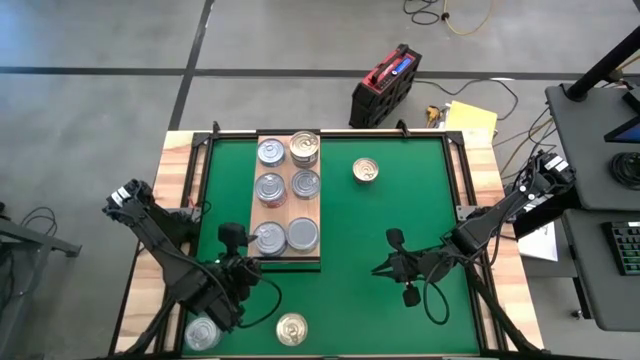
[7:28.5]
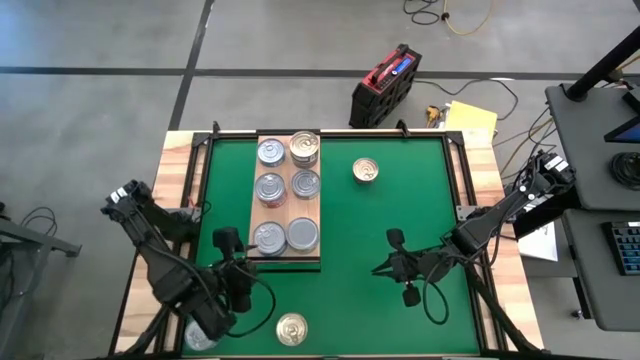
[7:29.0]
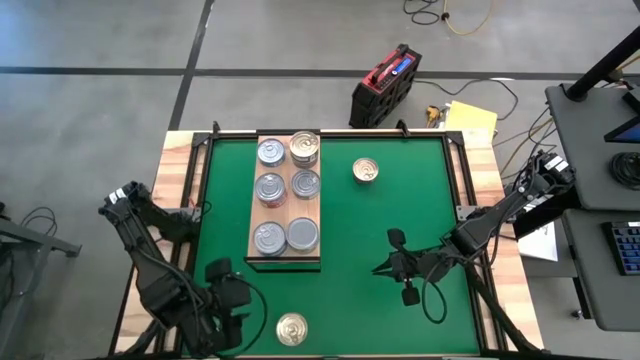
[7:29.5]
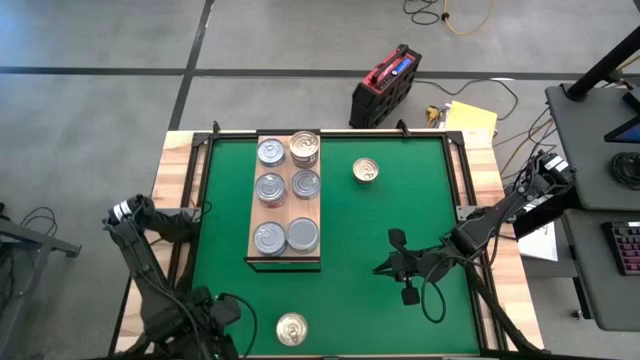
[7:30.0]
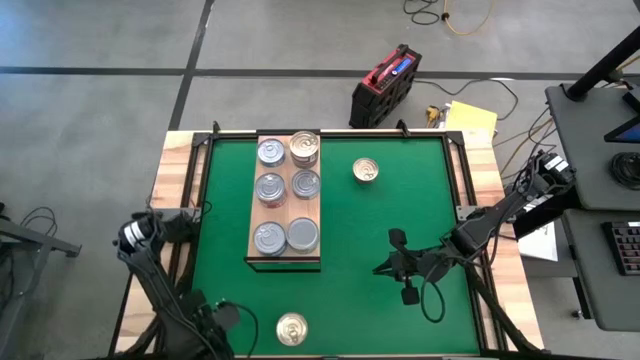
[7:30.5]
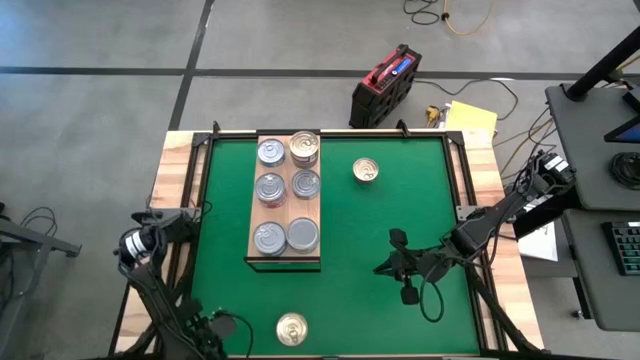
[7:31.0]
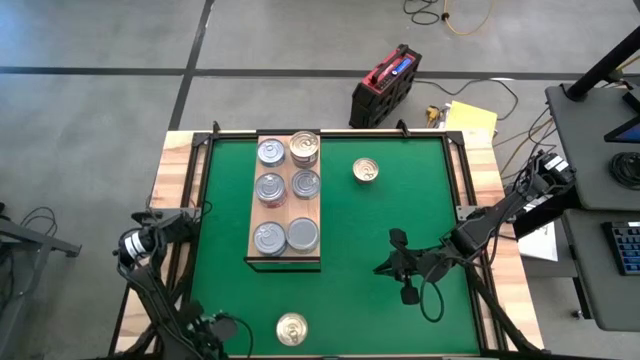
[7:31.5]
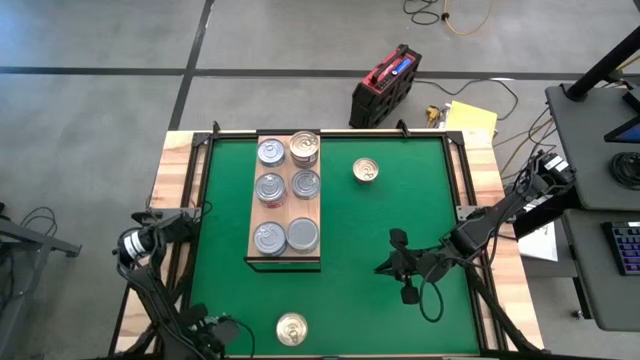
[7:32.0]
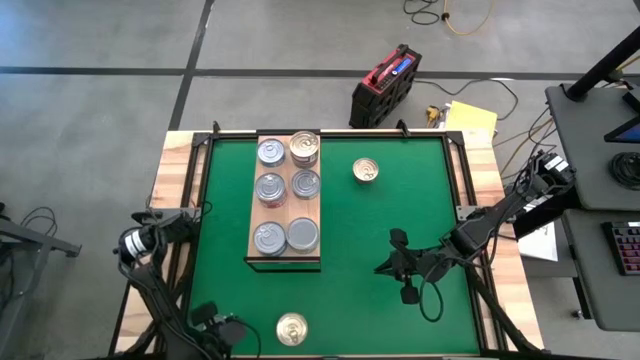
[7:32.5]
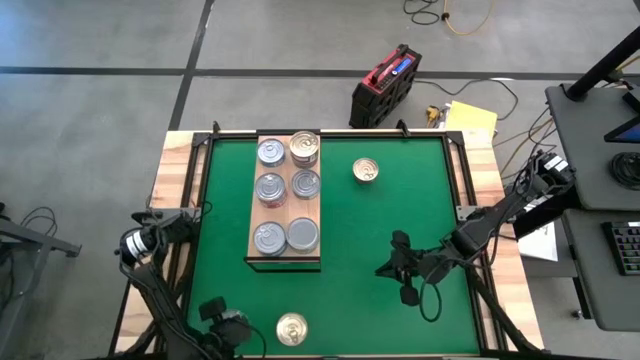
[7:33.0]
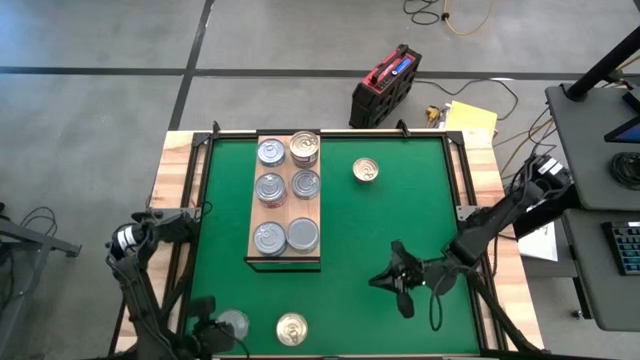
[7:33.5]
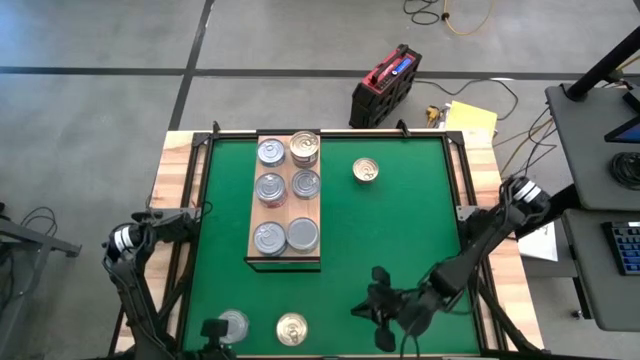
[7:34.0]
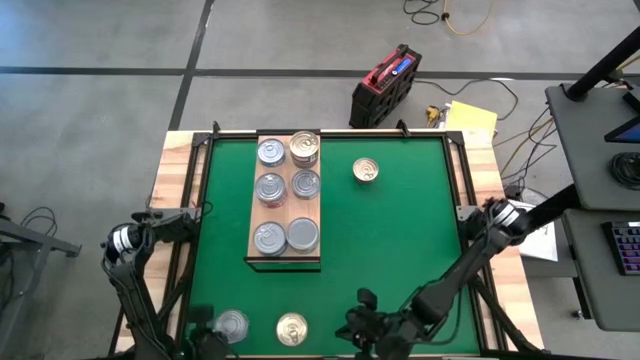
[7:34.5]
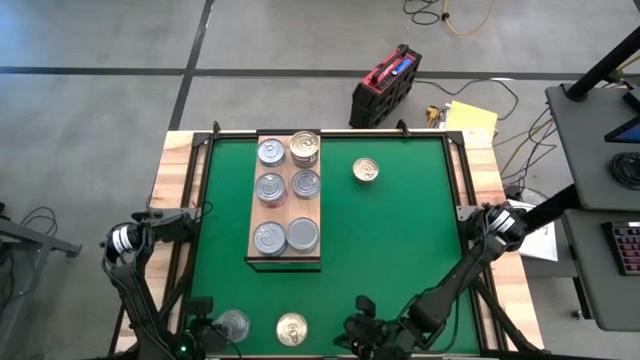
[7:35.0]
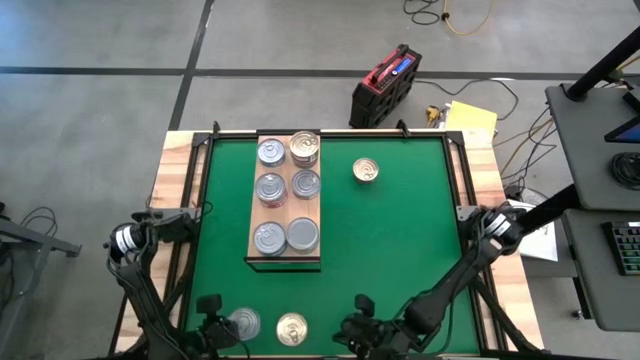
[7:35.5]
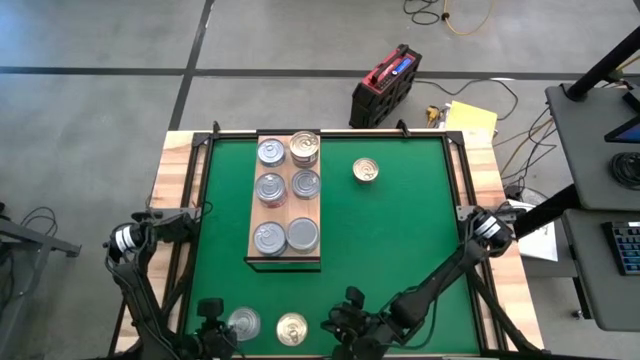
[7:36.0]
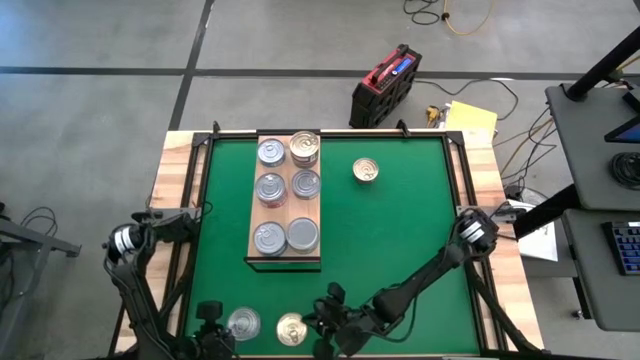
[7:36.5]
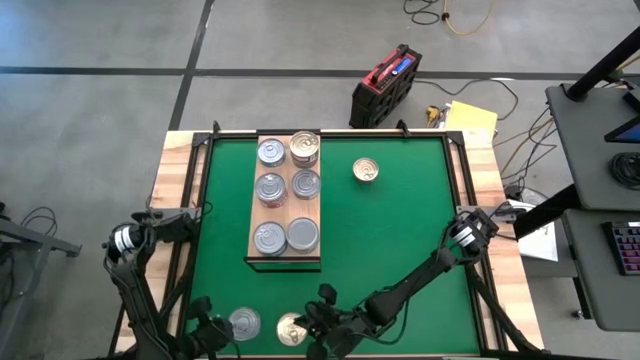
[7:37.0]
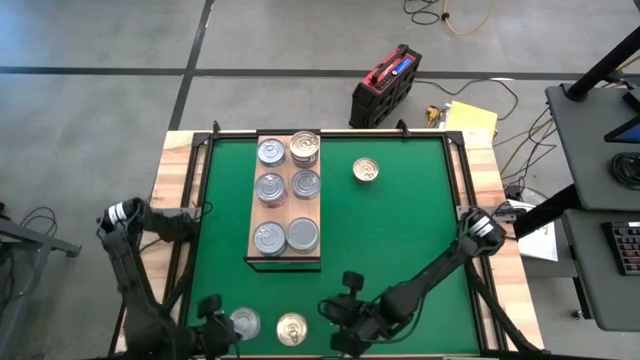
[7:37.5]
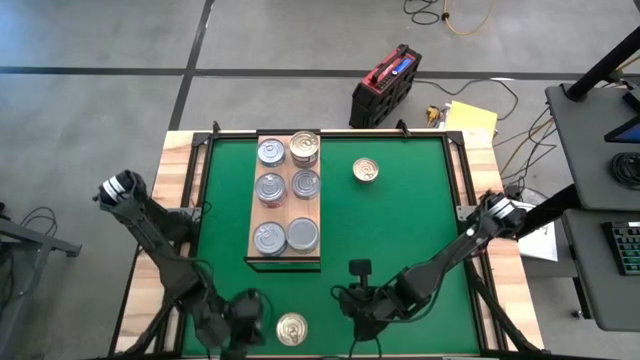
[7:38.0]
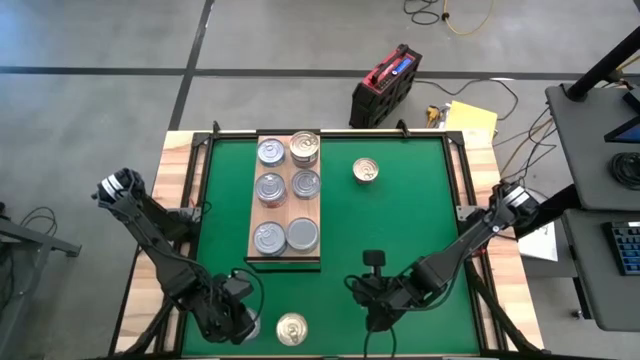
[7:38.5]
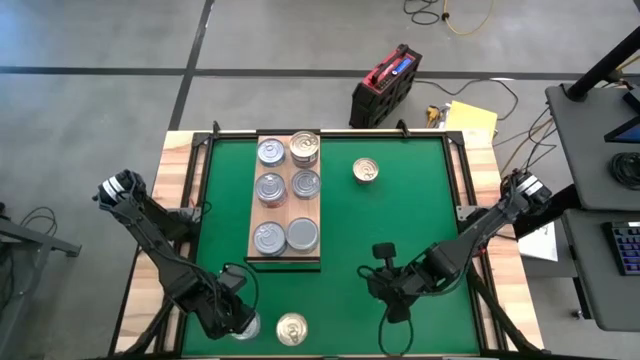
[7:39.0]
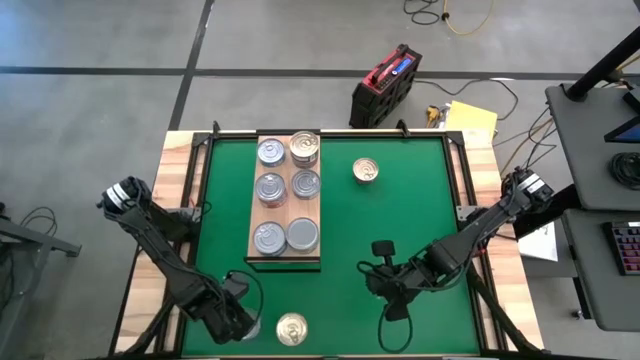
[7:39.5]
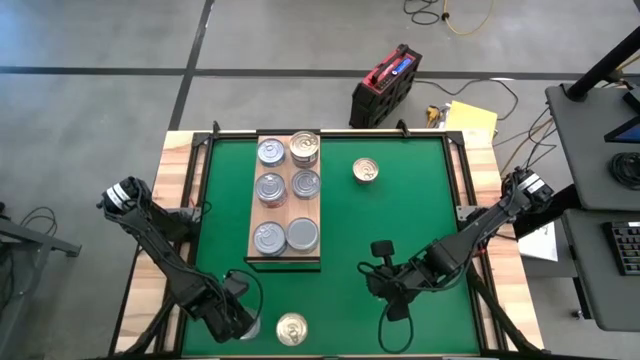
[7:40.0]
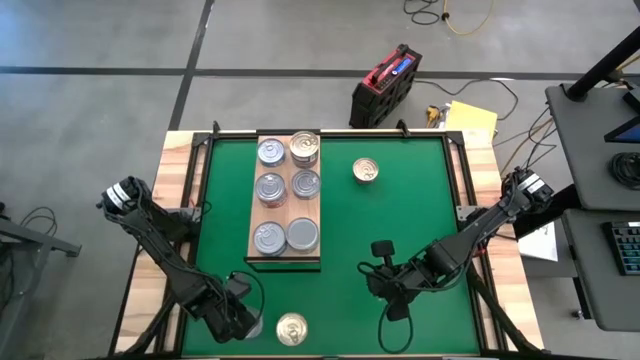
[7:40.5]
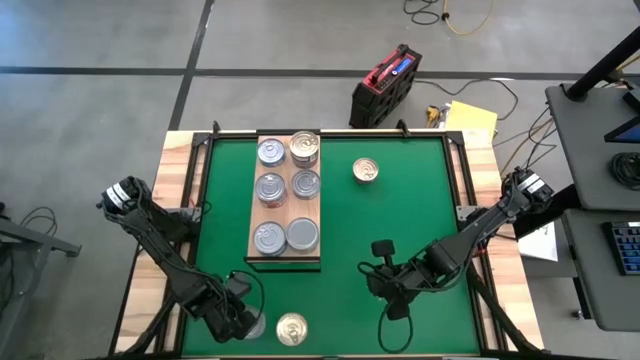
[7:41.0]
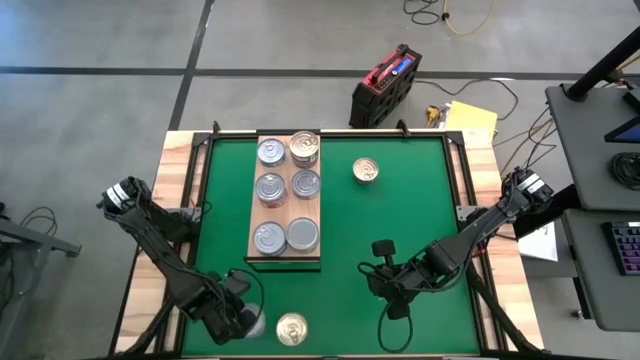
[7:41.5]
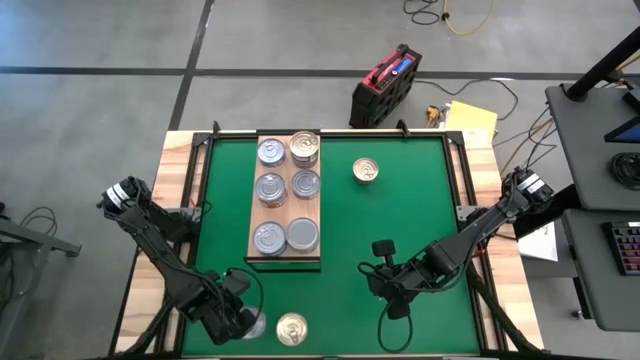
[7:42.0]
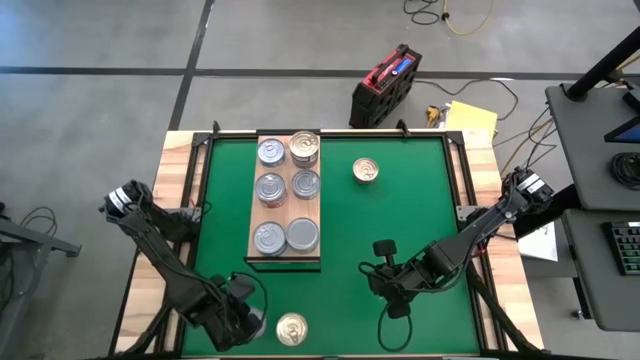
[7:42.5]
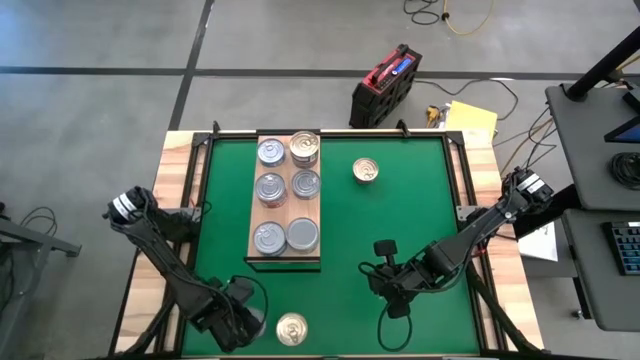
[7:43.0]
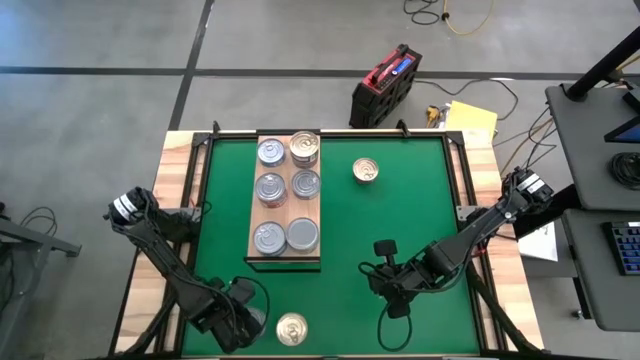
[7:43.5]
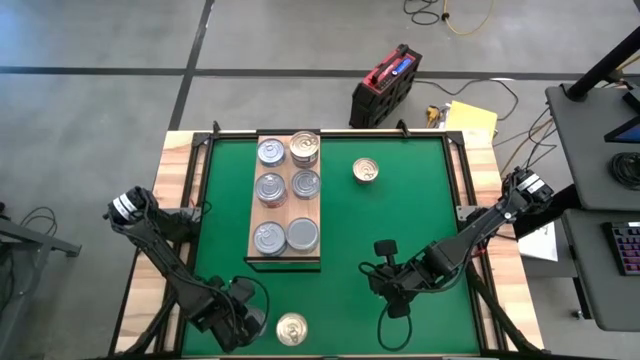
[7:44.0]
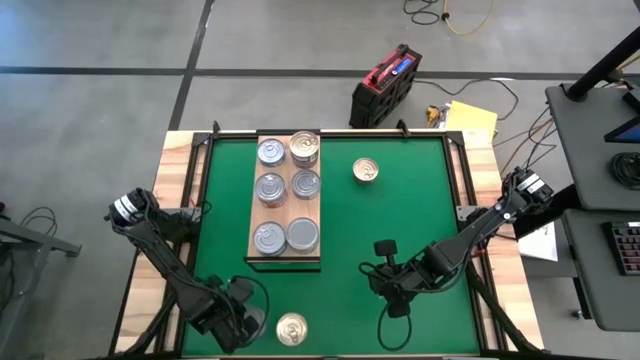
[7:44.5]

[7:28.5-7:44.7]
Task: Stack canned seafood by type on shelf
Put the blue tuna can on the shelf

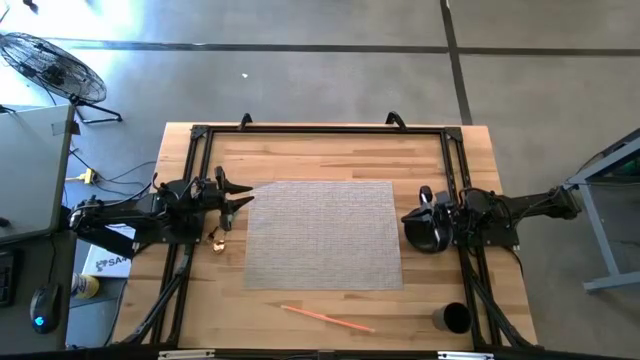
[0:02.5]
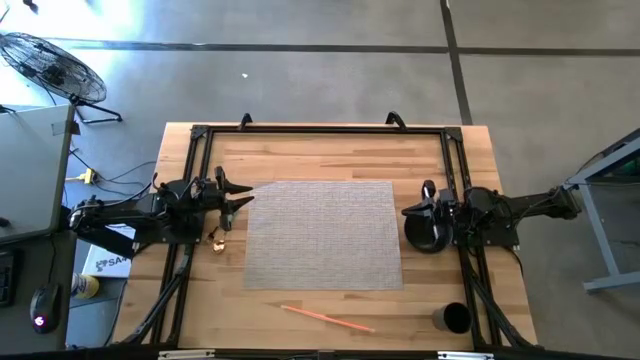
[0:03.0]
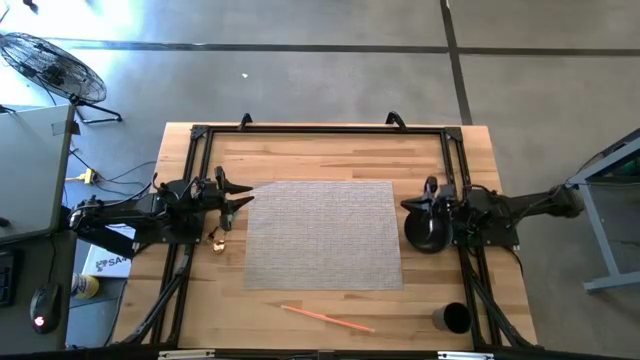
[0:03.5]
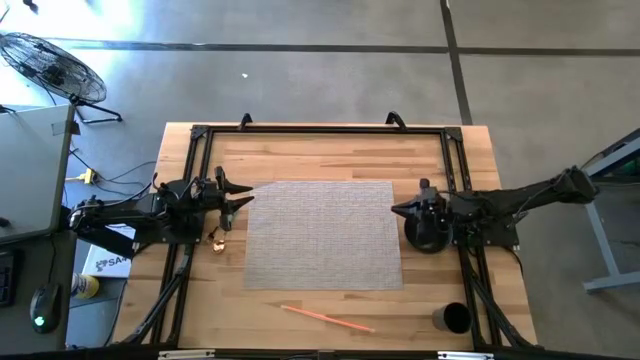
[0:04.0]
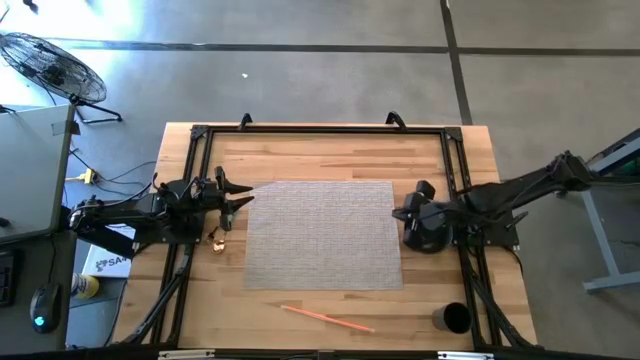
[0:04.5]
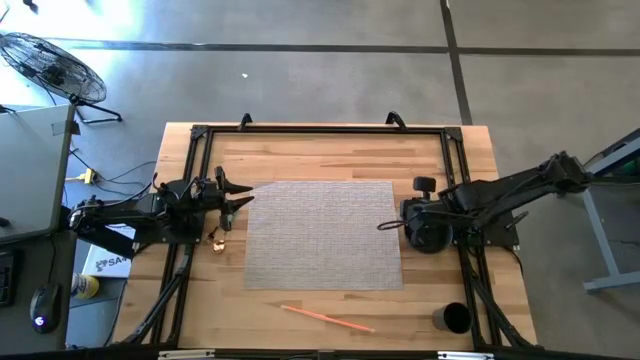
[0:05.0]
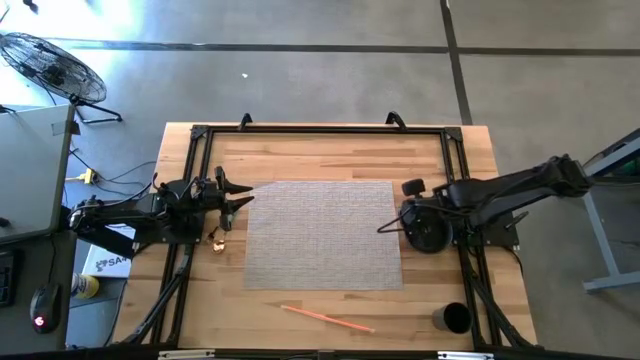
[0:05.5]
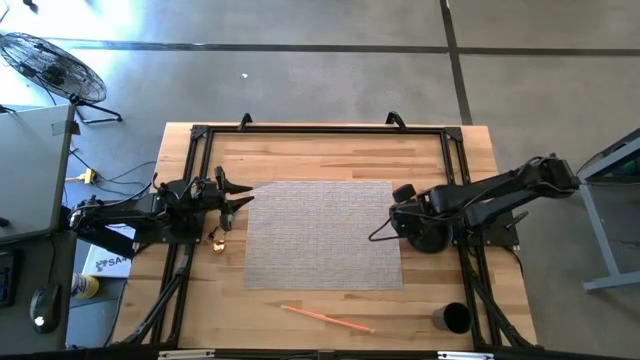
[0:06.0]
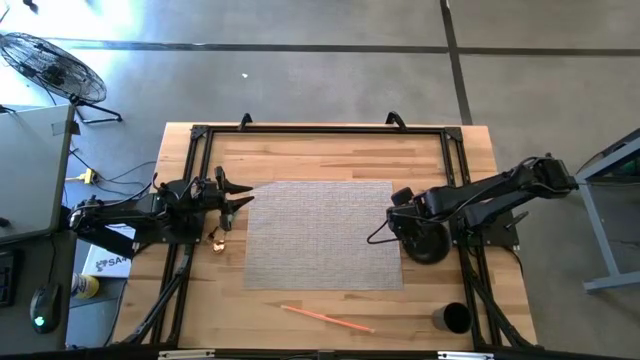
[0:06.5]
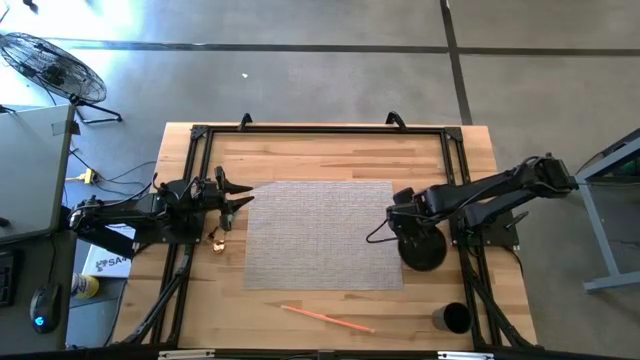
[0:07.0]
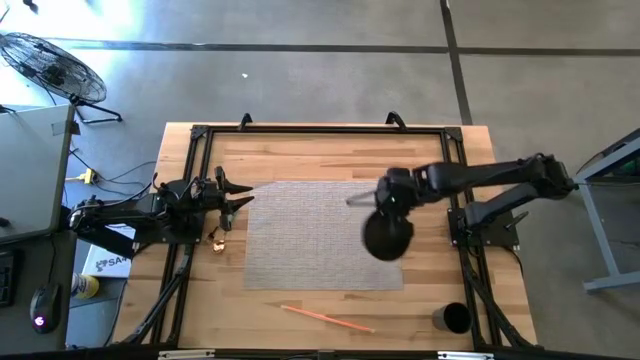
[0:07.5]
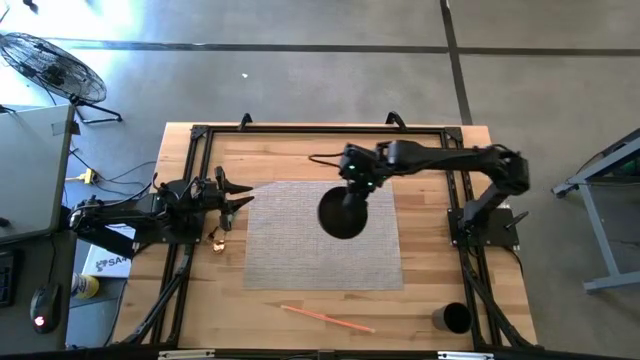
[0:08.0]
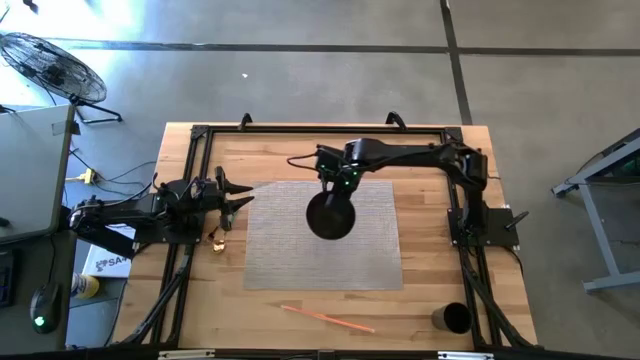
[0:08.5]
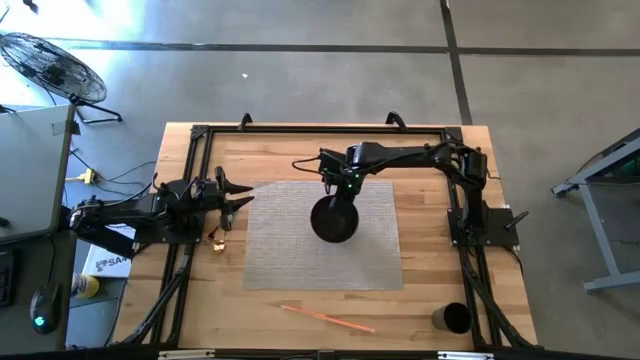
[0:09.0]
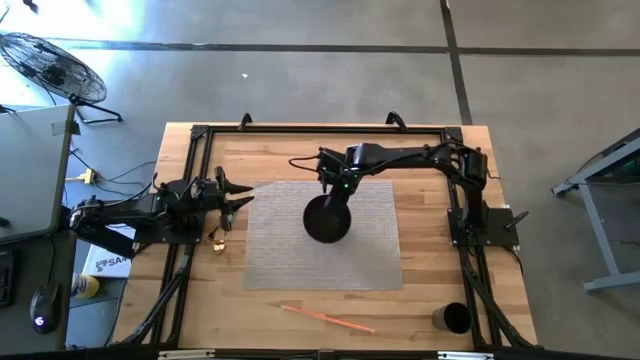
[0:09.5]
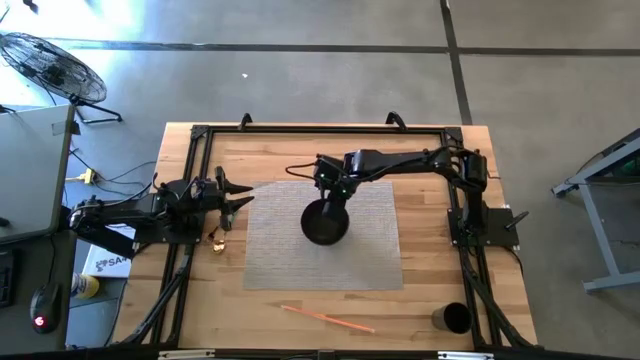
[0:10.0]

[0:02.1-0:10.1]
Task: Pick & Place Utensil
Put the black bowl on the gray mat
